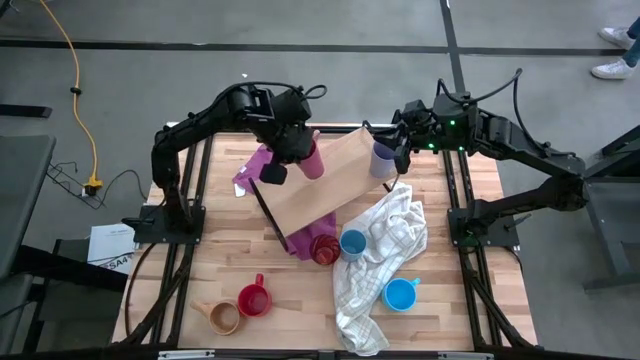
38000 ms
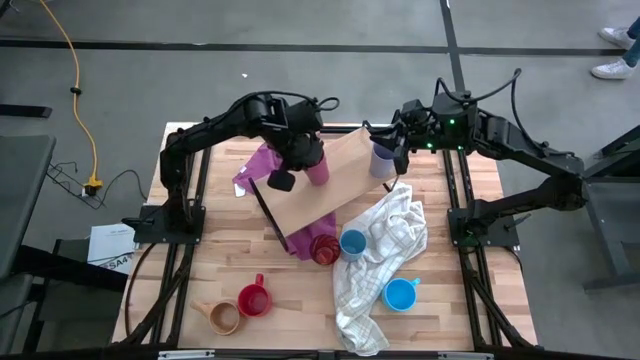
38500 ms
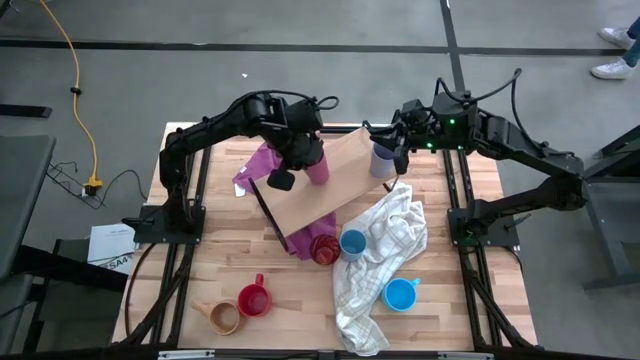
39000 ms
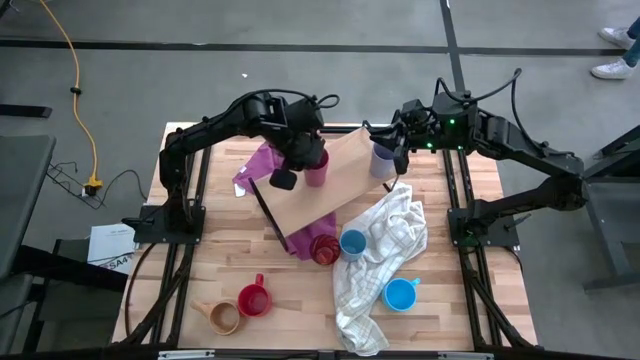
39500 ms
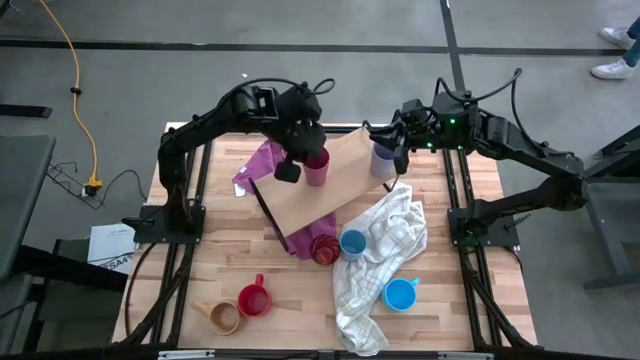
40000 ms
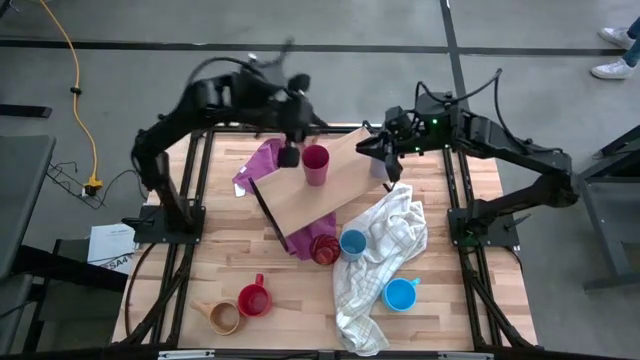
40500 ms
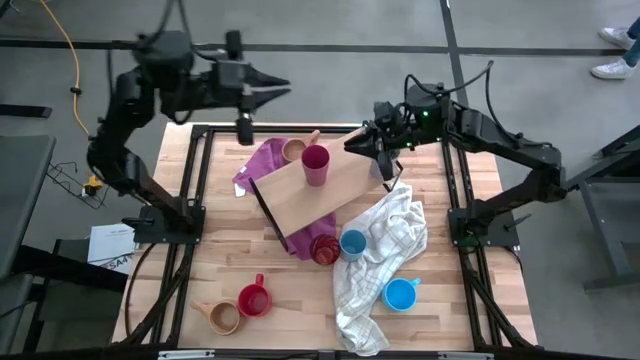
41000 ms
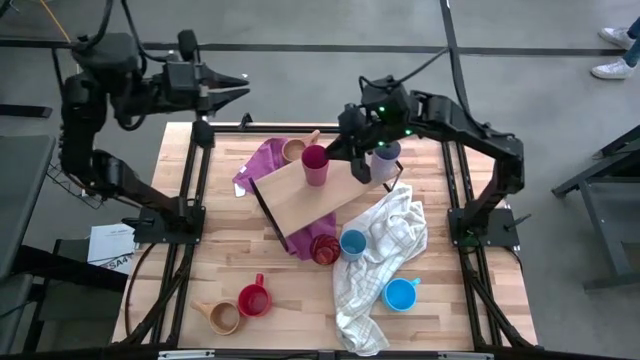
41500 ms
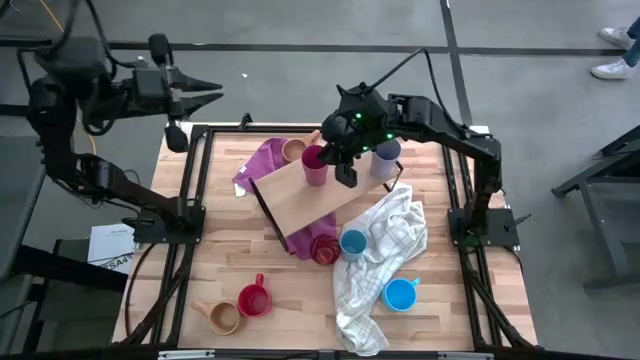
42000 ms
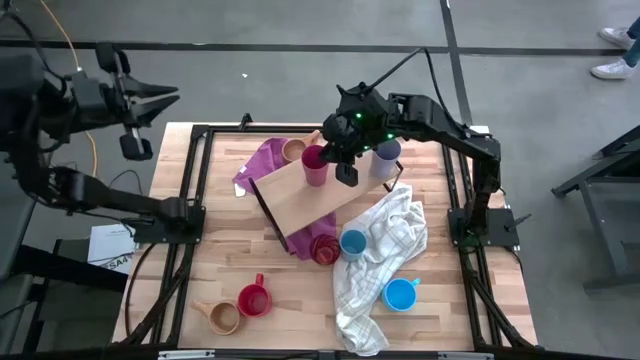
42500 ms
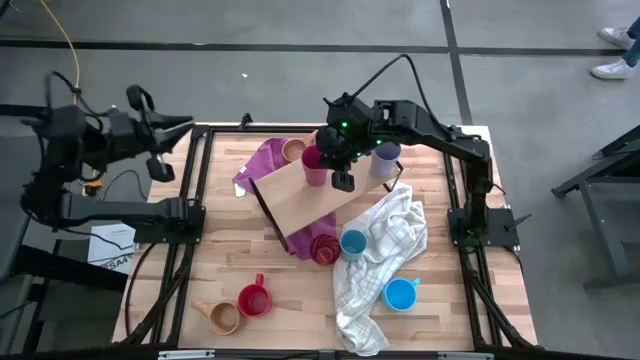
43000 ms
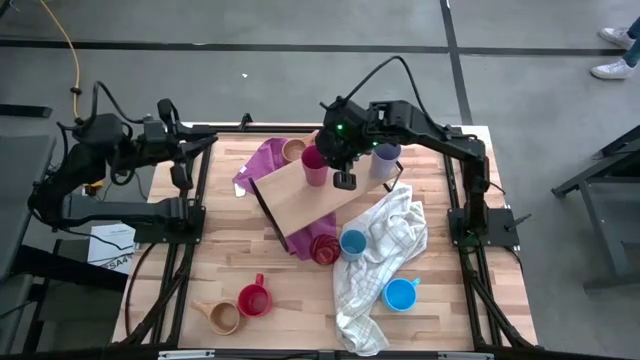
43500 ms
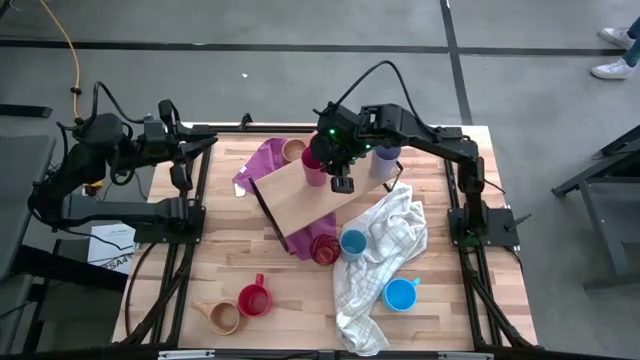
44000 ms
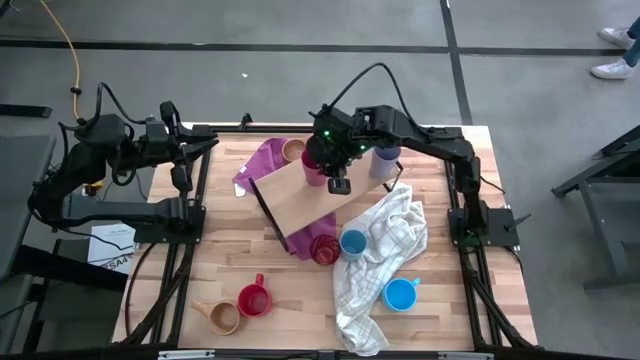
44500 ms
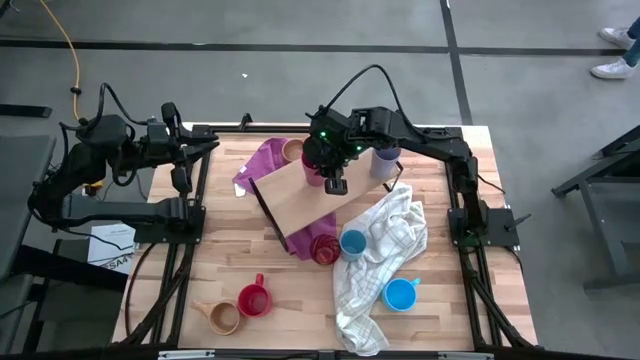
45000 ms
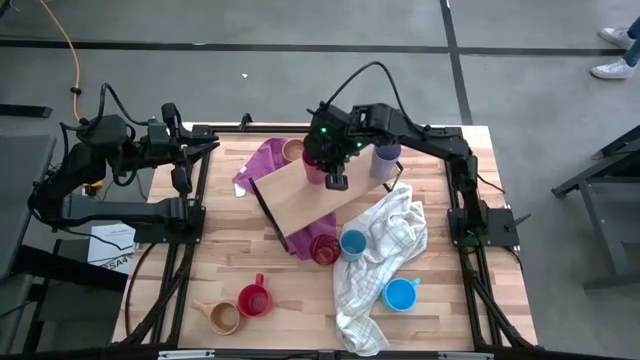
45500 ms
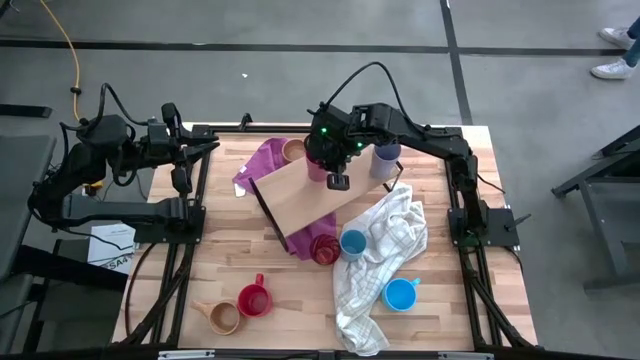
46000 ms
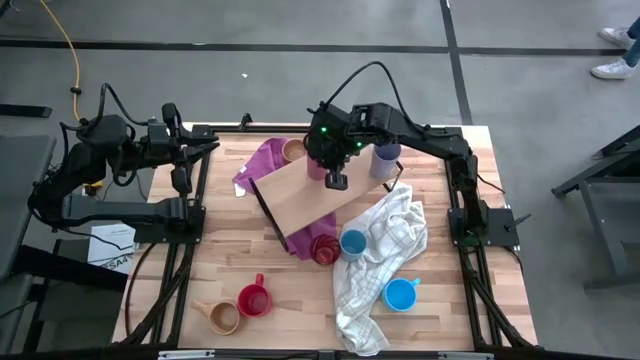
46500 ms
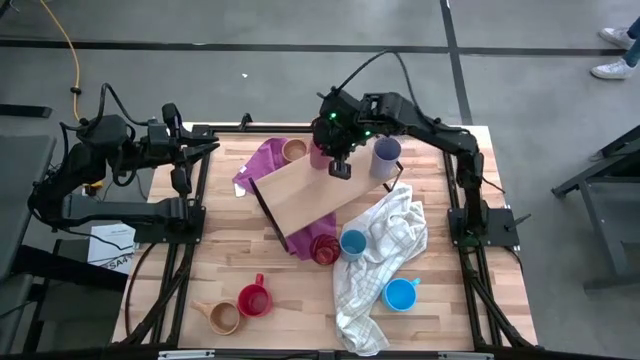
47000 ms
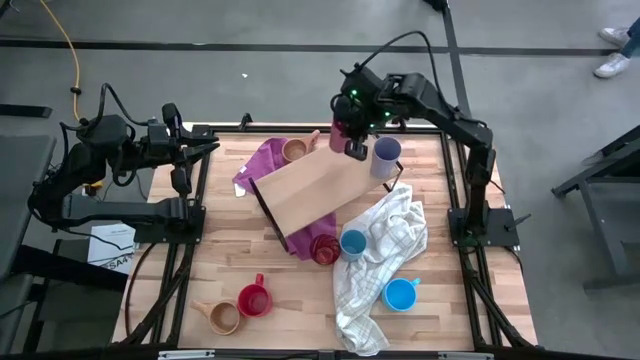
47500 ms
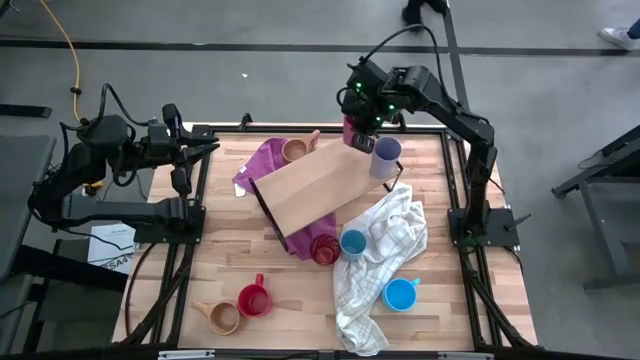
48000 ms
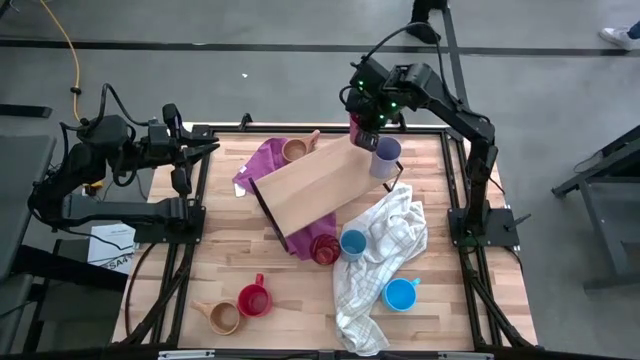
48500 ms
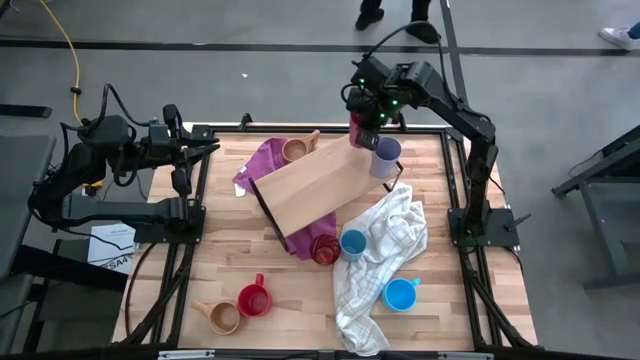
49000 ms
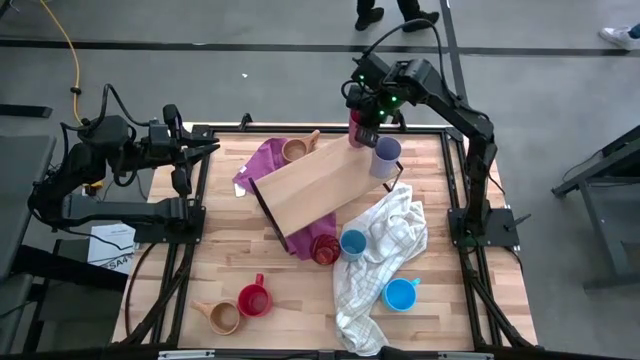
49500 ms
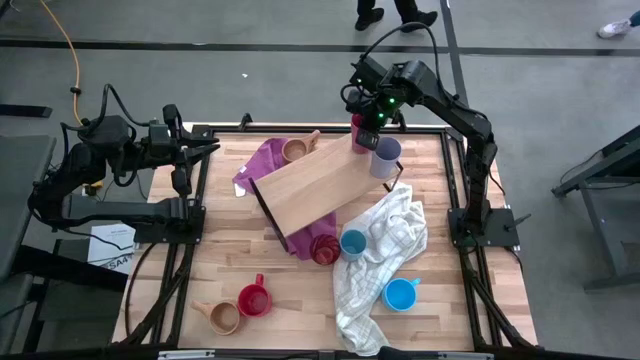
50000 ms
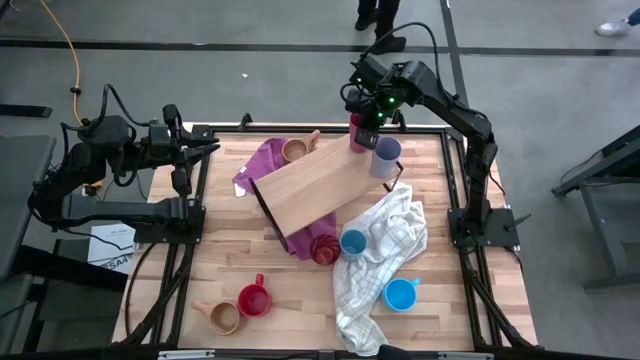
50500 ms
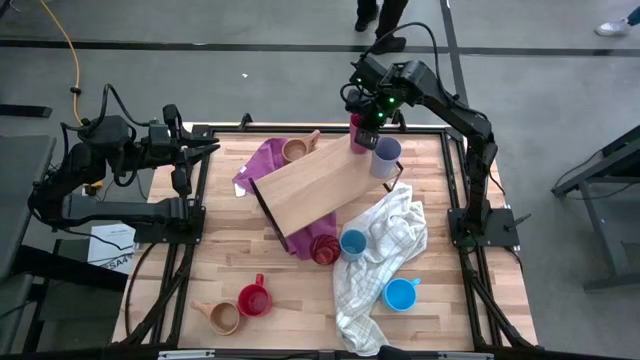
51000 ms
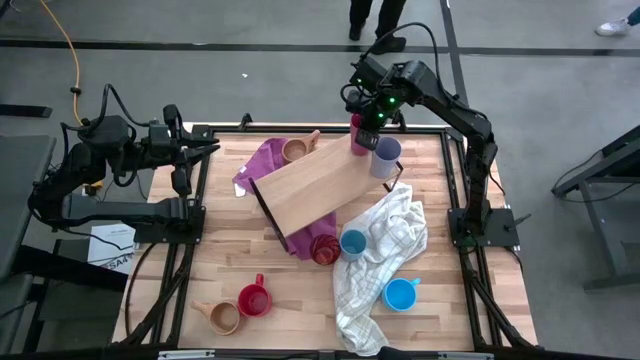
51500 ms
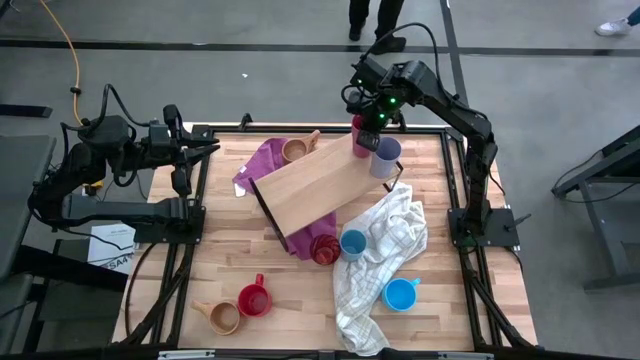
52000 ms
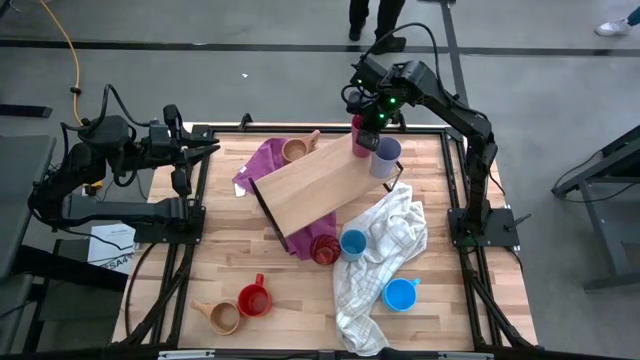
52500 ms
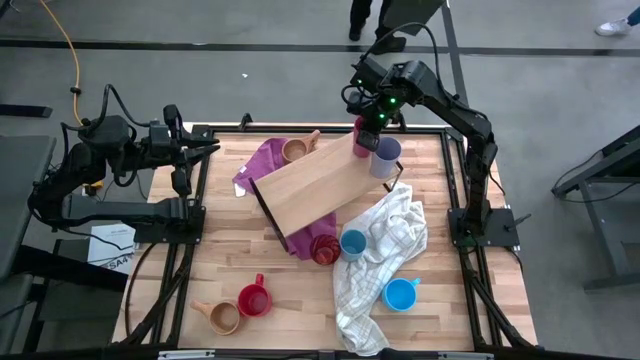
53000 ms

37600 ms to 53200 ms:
Task: Stack small to large cups/mugs on shelf
Put the pink cup on the shelf

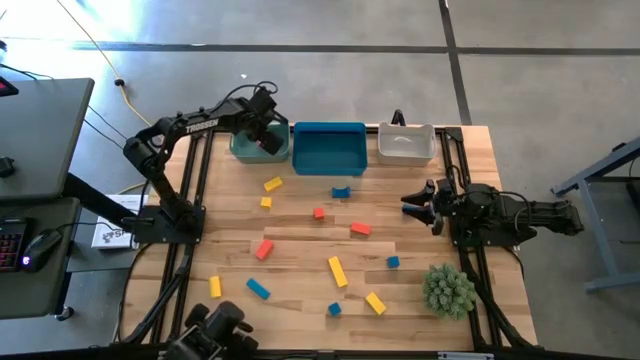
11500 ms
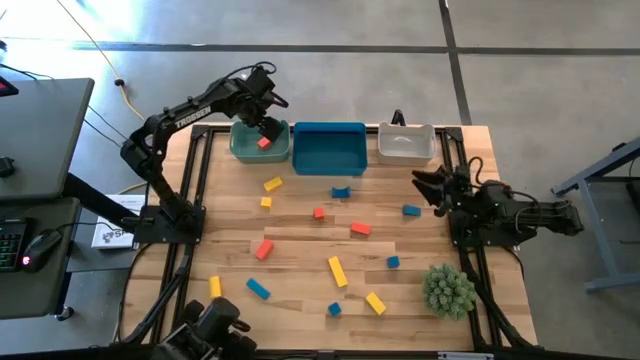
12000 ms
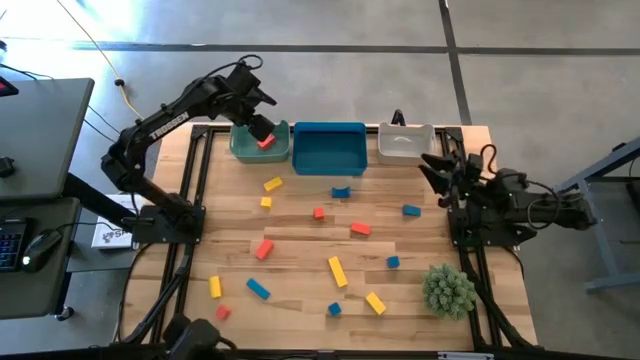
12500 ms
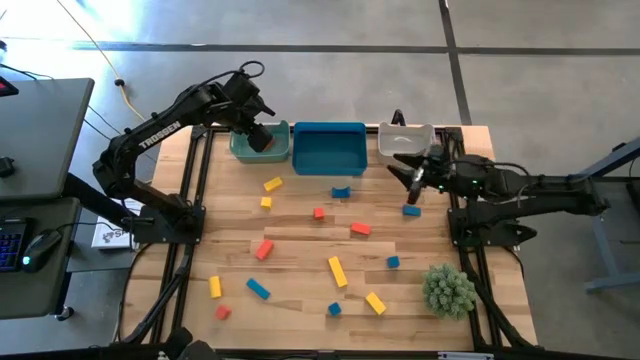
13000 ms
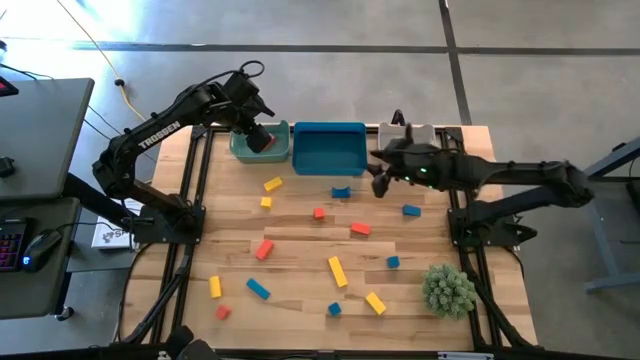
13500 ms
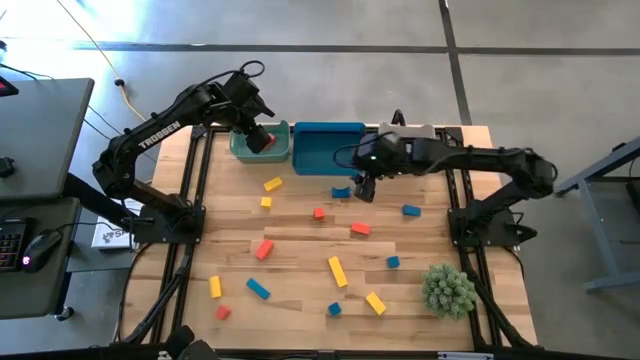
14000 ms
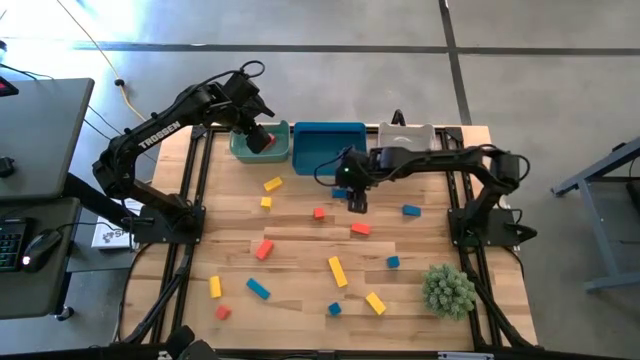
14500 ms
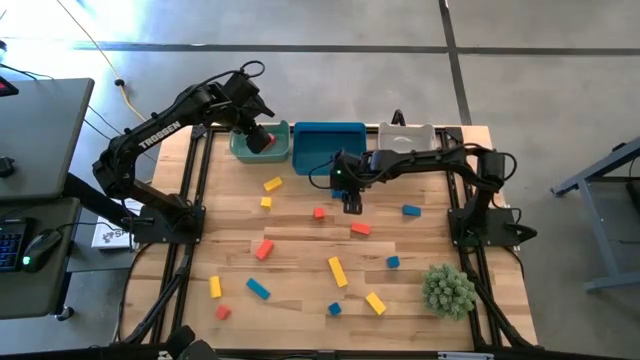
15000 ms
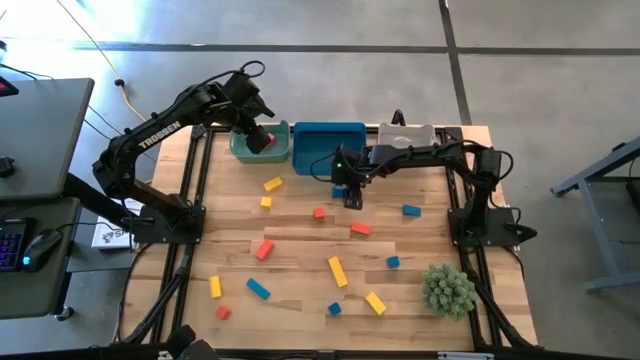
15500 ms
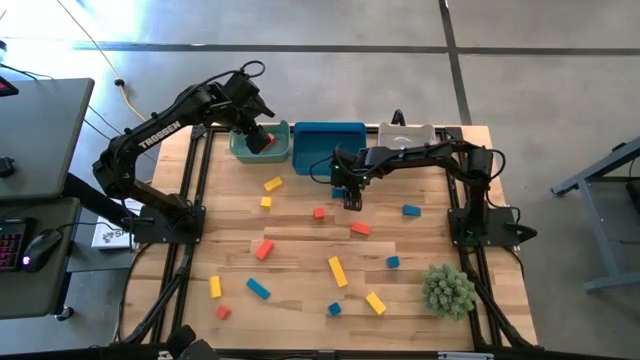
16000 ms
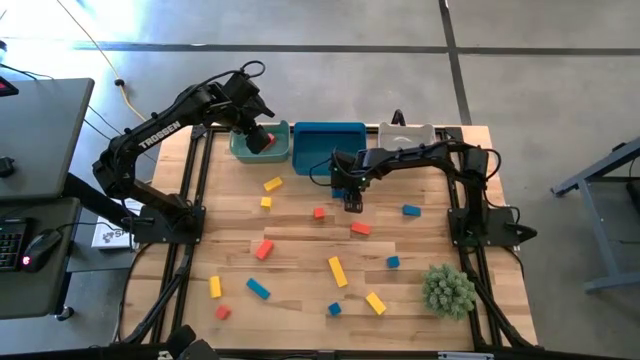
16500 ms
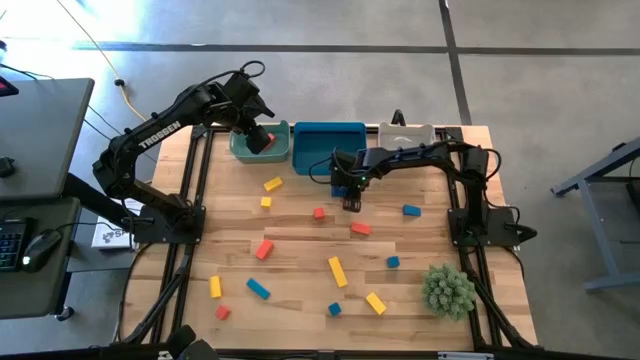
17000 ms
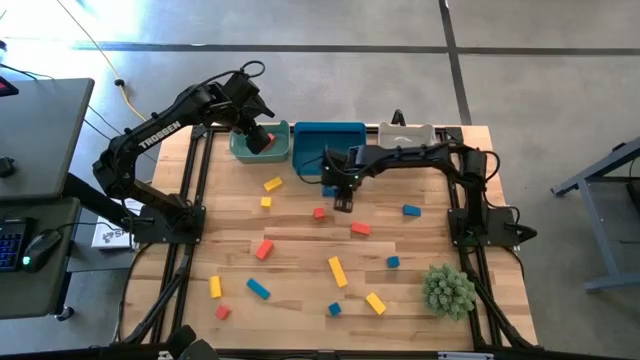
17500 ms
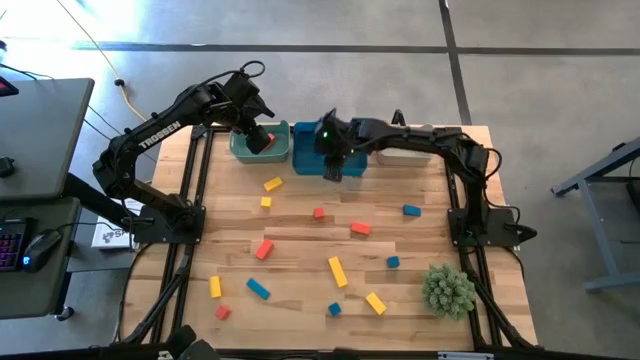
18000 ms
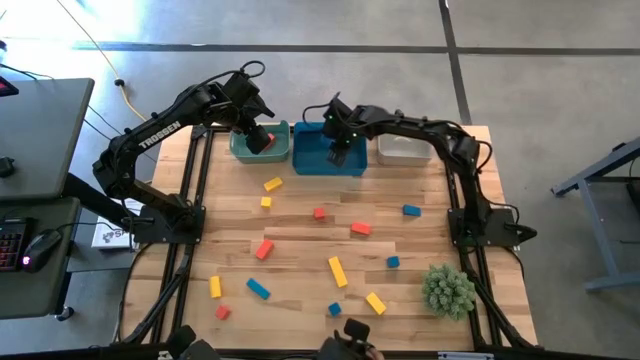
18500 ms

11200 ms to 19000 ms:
Task: Sort & place blocks by color
Put the blue block into the blue bin
